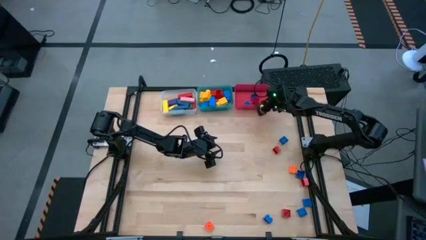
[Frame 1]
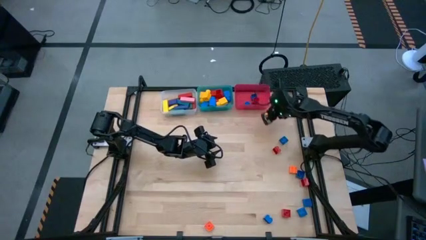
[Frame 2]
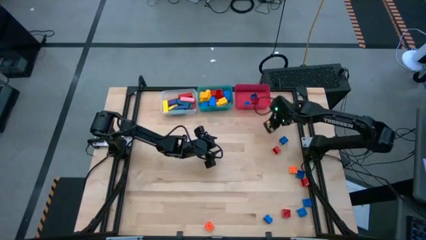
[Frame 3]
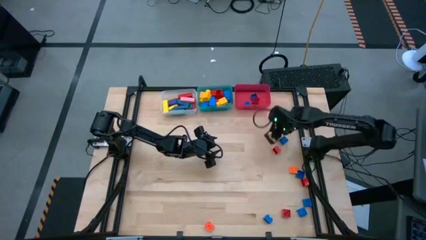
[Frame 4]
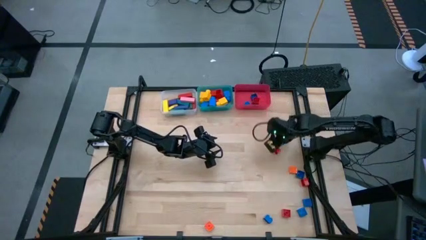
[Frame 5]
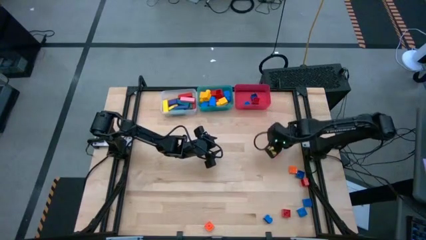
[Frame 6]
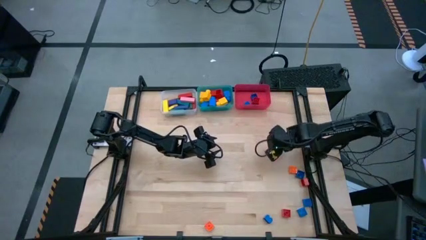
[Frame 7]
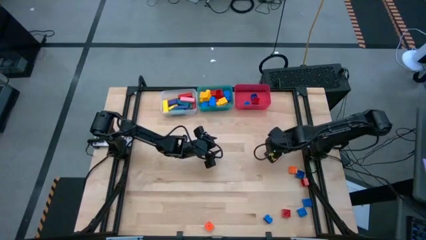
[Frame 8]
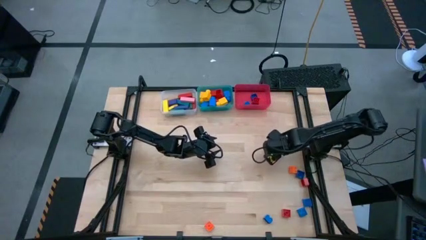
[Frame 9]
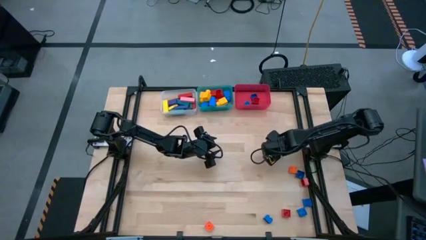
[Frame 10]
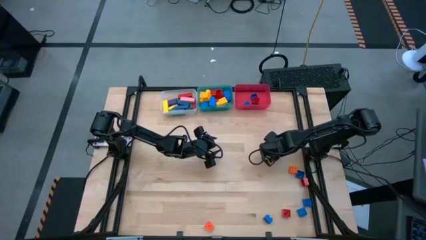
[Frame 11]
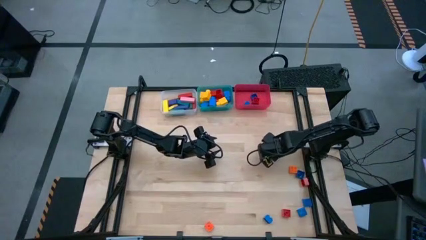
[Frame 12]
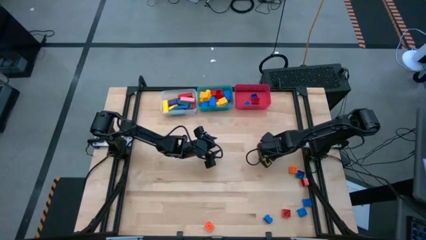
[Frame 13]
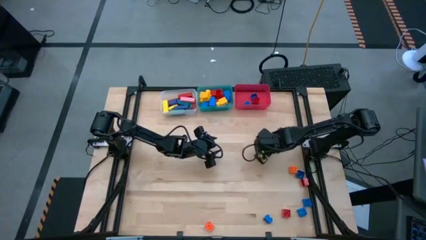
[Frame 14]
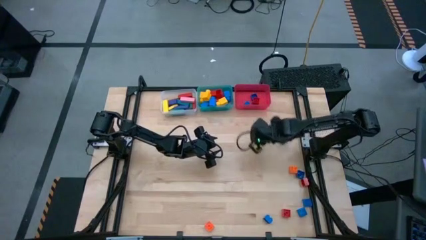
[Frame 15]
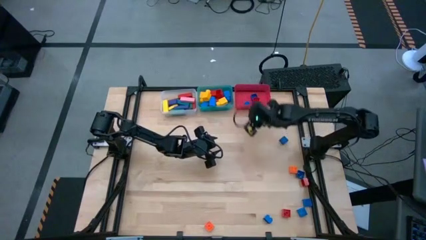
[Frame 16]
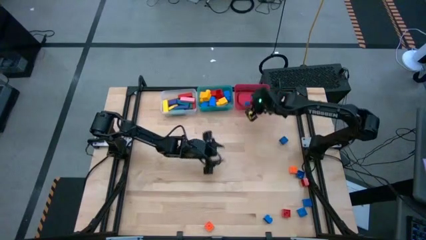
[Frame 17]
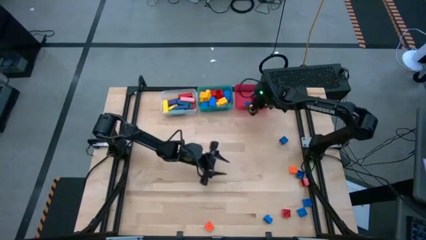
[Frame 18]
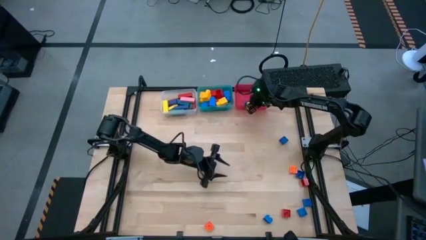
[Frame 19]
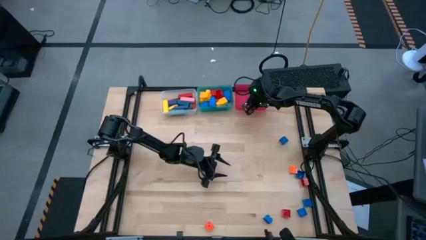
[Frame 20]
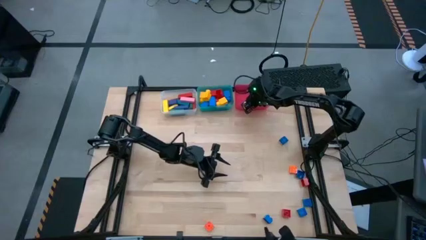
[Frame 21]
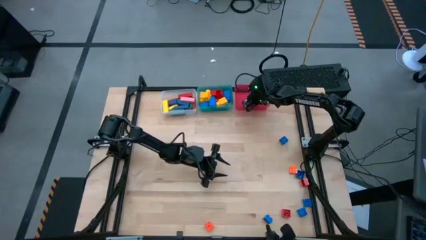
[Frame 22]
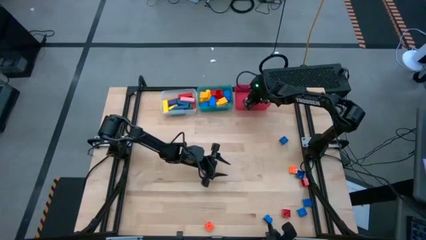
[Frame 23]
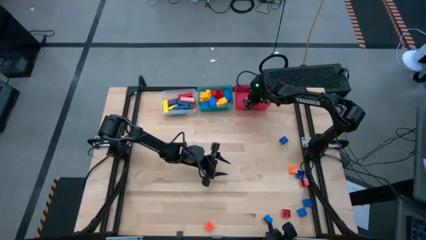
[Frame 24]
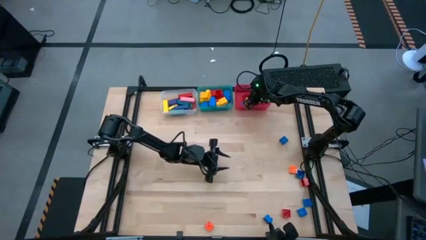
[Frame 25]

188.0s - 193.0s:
Task: Sort blocks by size
Put the red 4 stud game piece into the red bin

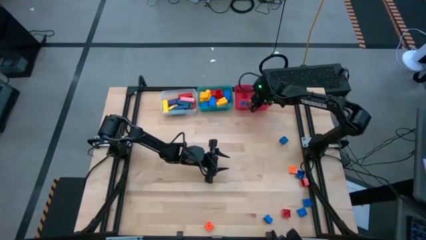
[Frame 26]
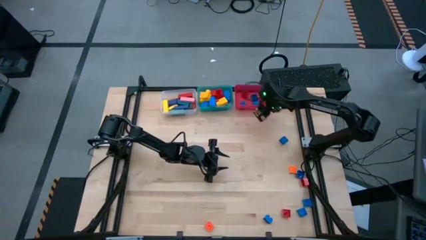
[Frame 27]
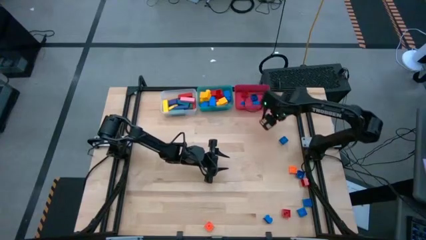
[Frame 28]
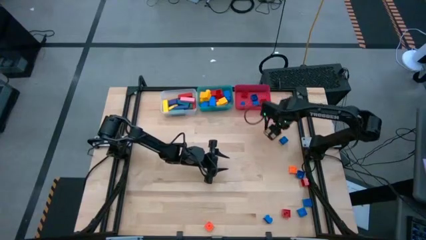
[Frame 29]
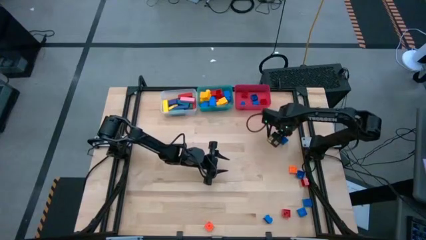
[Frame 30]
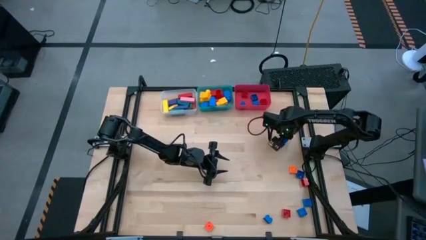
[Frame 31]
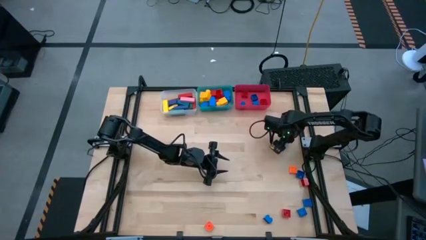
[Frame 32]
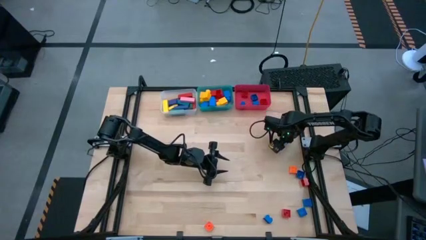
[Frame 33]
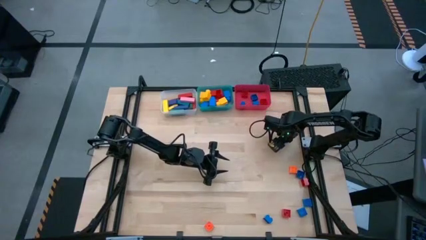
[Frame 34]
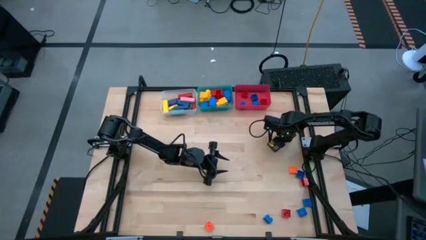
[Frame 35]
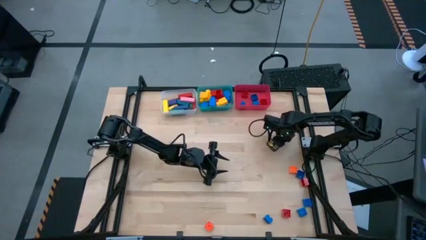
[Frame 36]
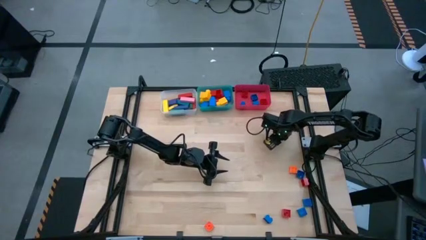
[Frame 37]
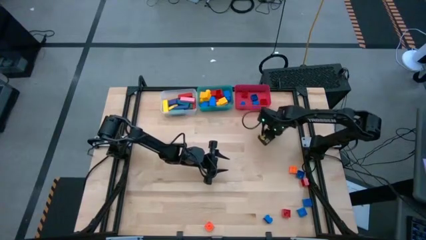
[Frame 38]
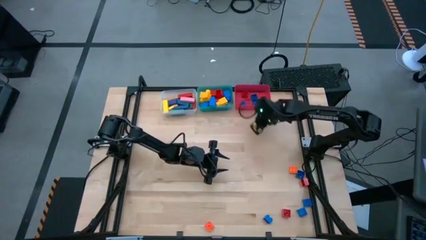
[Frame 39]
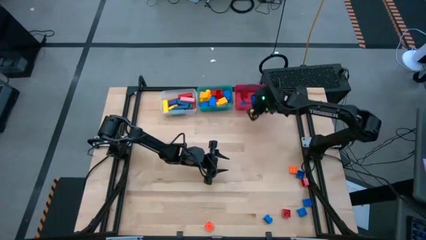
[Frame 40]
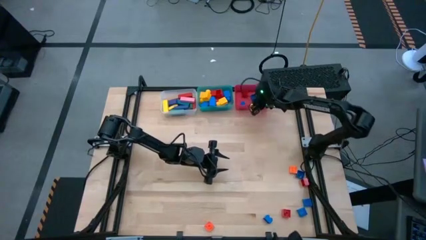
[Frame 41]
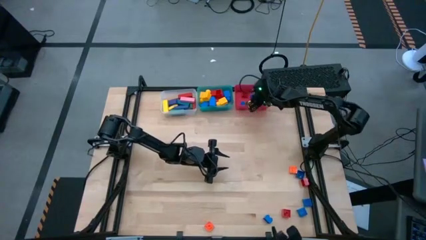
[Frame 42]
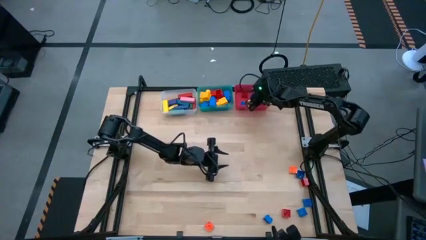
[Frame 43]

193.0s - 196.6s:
Put the blue 4 stud game piece into the red bin

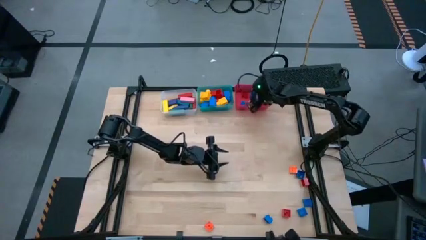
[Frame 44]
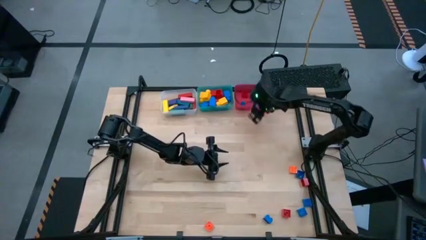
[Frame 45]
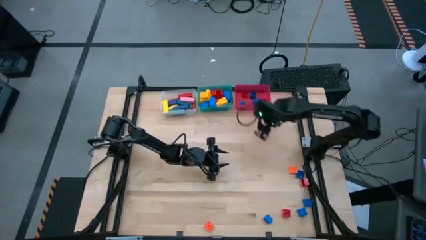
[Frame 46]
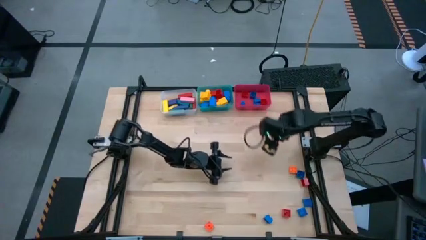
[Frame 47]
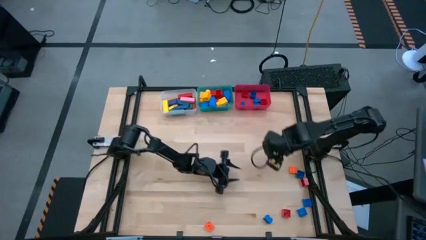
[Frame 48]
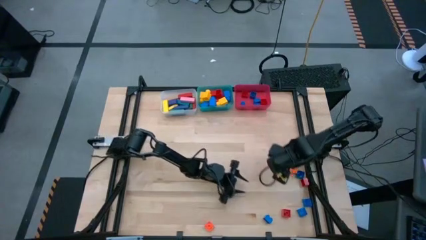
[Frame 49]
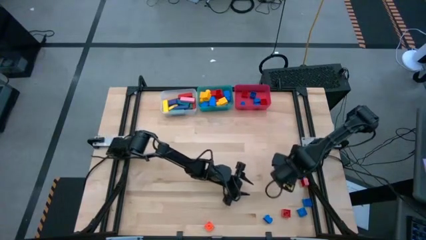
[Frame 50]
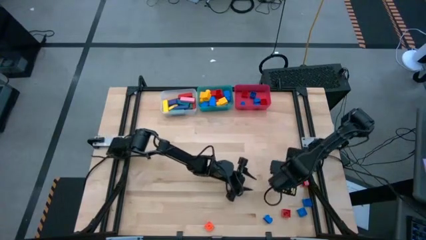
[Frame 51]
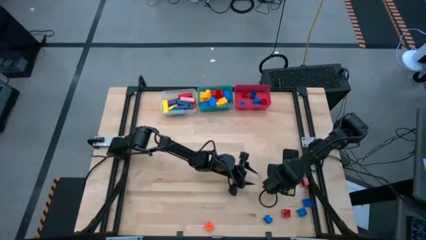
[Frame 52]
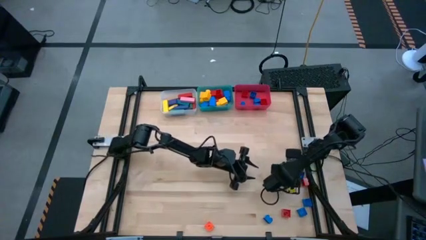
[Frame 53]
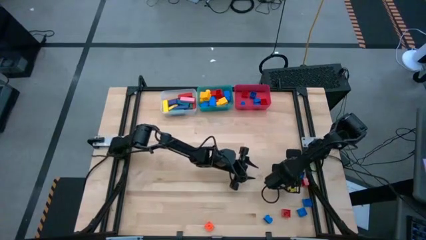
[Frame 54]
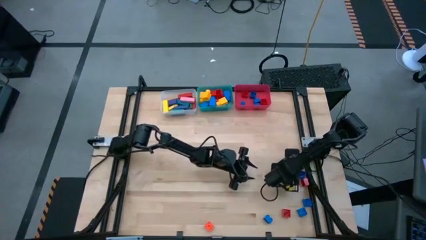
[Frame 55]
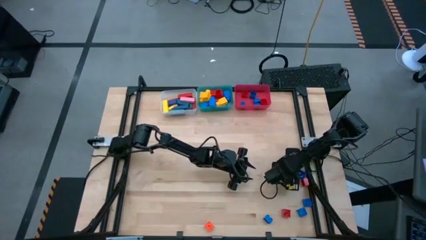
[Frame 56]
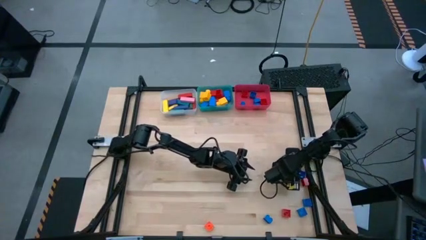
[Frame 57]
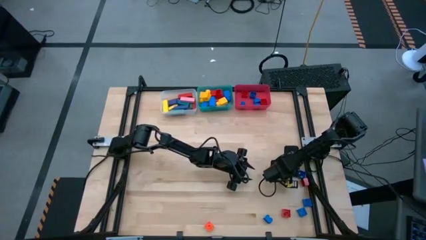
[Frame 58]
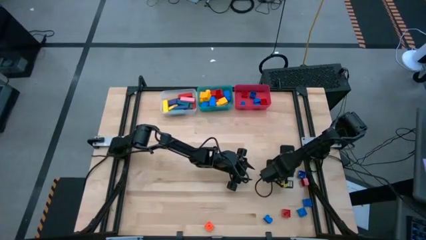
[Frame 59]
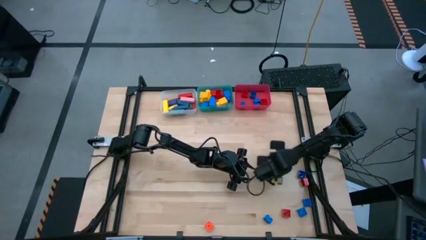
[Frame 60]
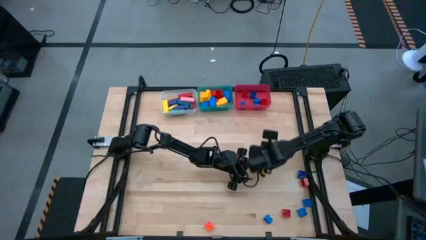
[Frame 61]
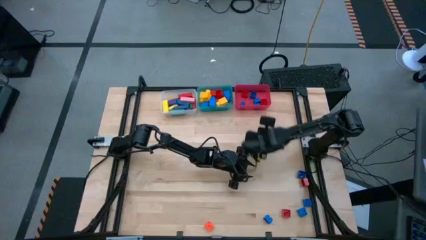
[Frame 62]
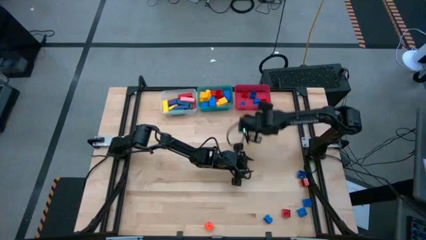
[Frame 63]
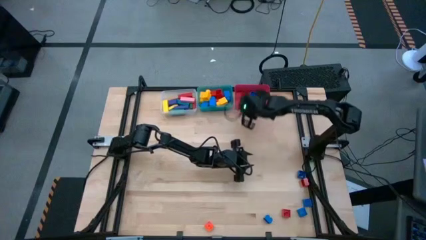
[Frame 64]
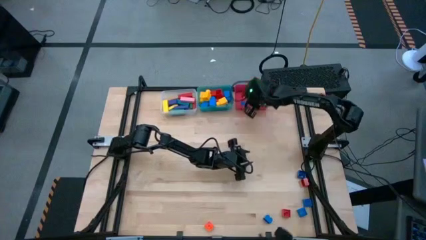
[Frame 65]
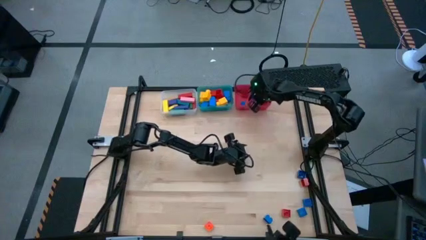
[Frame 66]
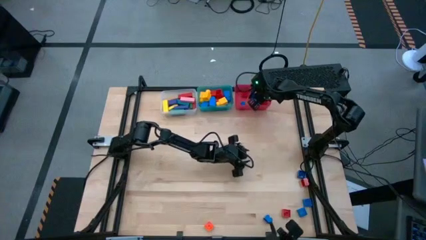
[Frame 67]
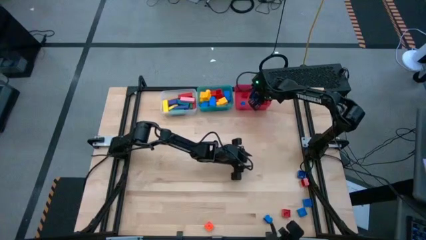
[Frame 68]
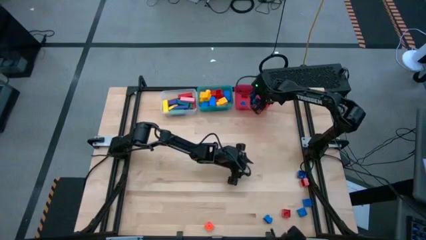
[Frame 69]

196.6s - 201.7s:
Put the orange 4 stud game piece into the red bin
